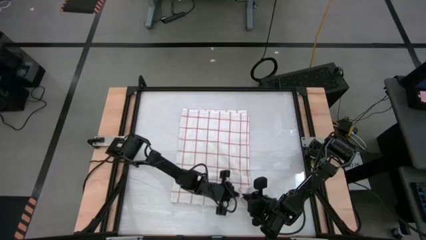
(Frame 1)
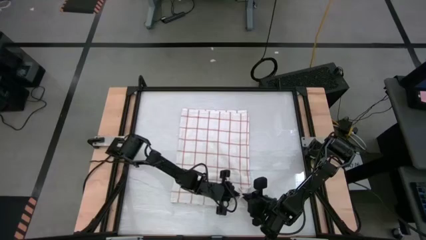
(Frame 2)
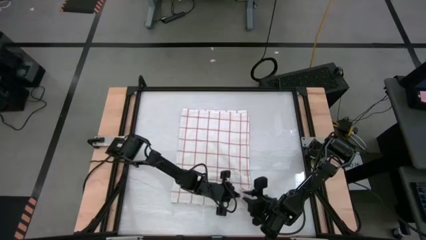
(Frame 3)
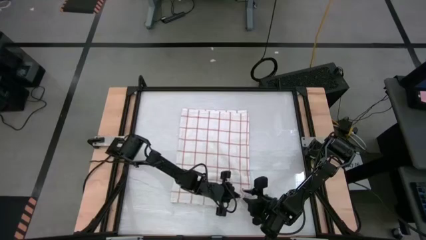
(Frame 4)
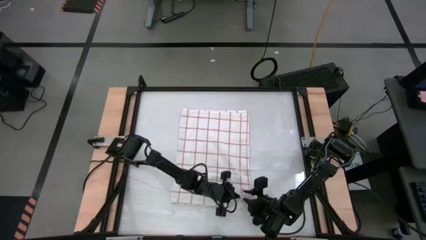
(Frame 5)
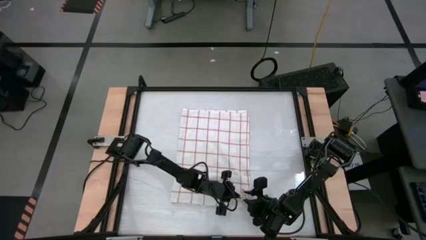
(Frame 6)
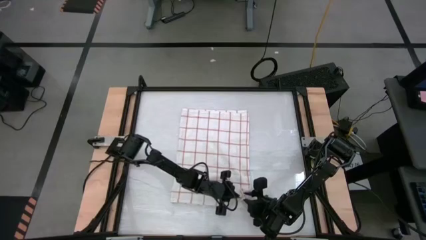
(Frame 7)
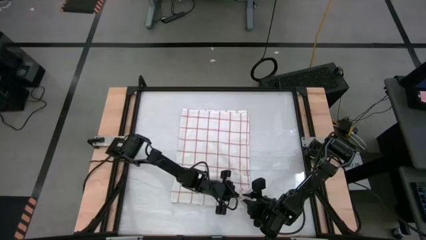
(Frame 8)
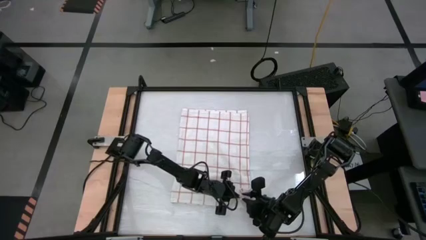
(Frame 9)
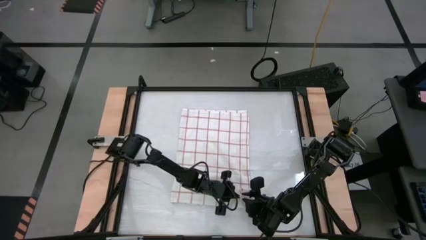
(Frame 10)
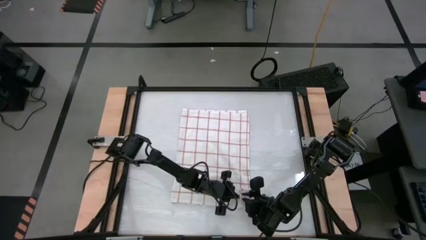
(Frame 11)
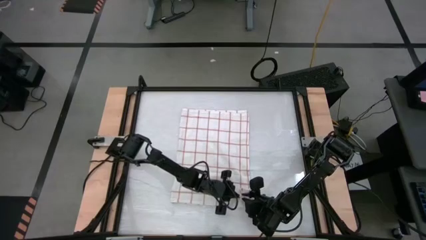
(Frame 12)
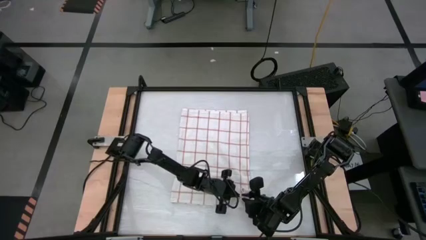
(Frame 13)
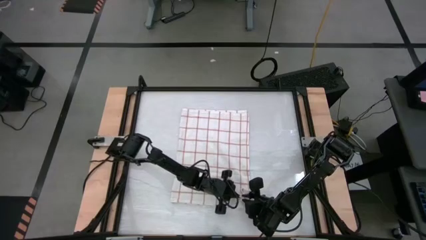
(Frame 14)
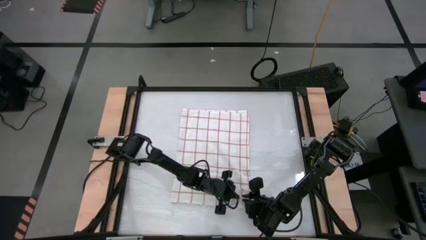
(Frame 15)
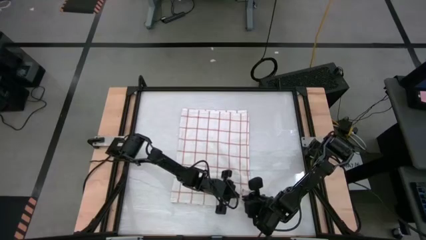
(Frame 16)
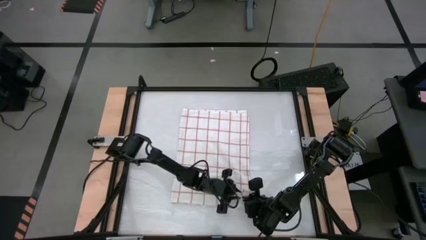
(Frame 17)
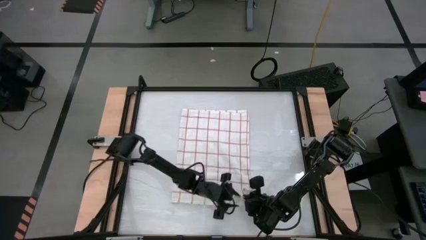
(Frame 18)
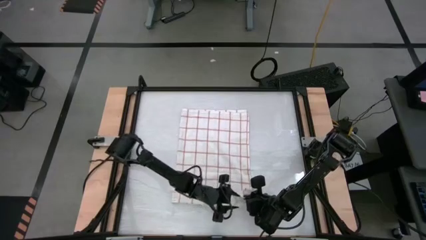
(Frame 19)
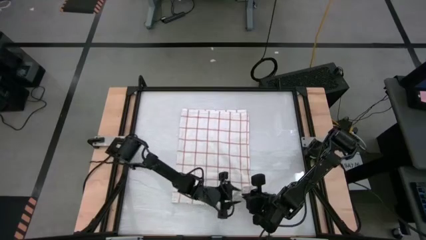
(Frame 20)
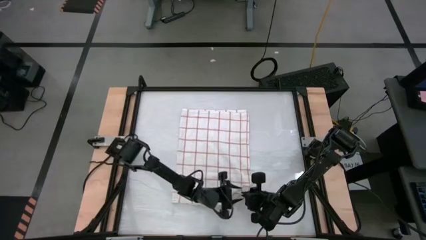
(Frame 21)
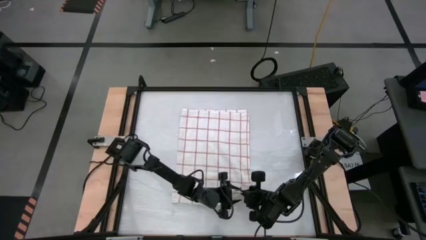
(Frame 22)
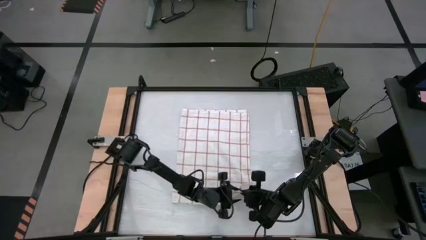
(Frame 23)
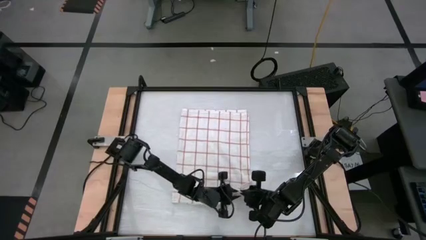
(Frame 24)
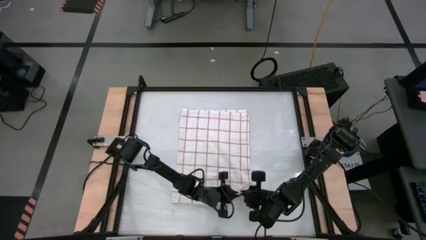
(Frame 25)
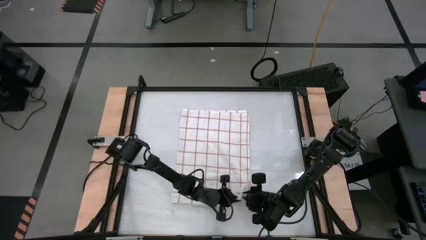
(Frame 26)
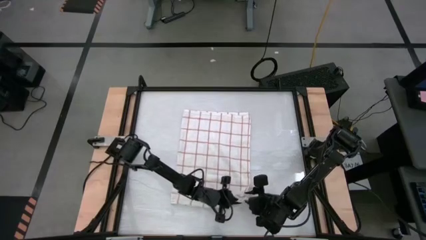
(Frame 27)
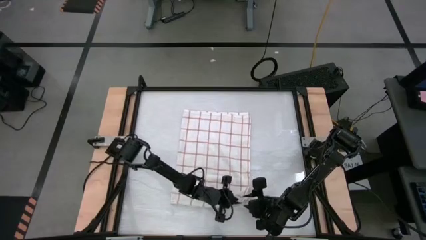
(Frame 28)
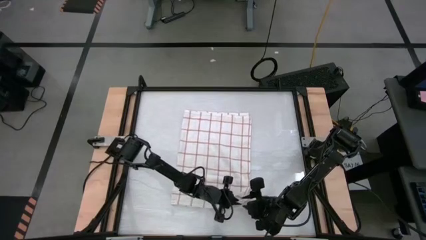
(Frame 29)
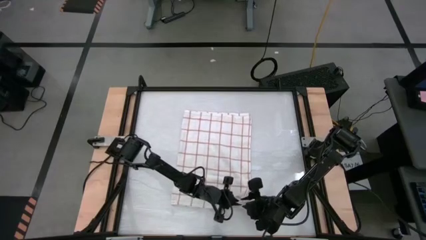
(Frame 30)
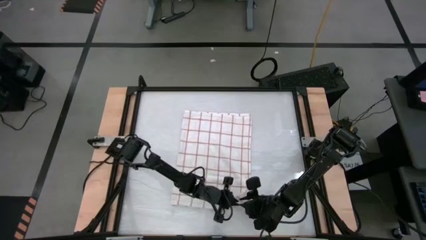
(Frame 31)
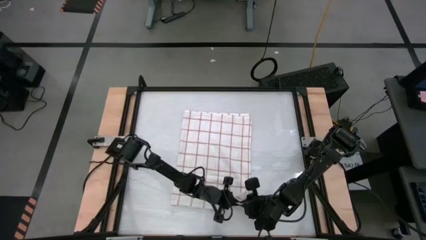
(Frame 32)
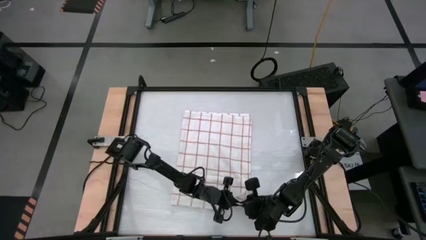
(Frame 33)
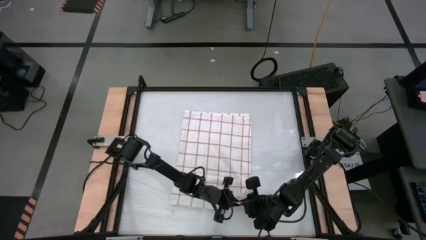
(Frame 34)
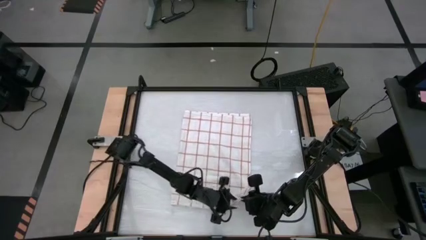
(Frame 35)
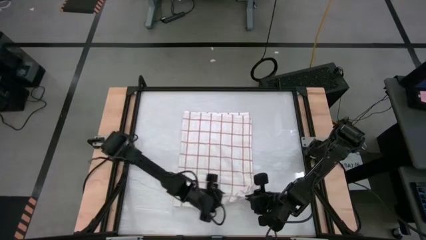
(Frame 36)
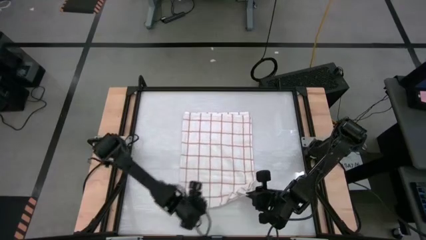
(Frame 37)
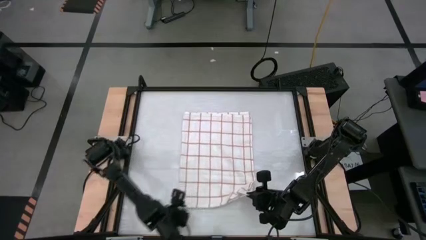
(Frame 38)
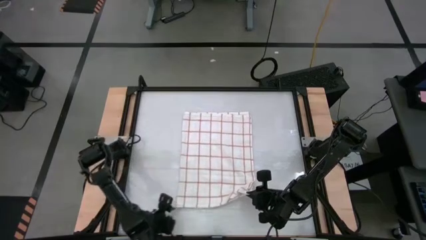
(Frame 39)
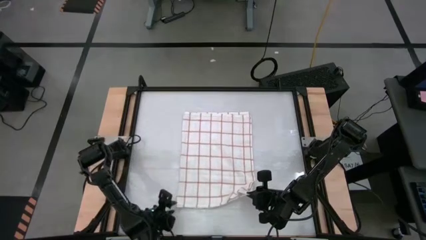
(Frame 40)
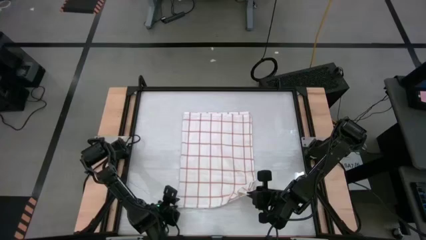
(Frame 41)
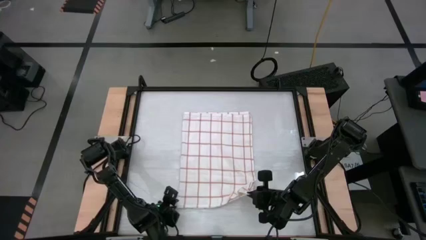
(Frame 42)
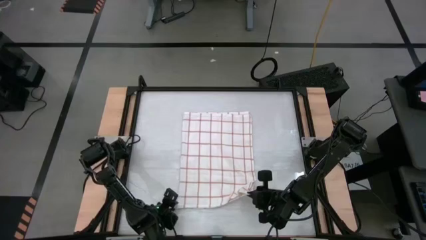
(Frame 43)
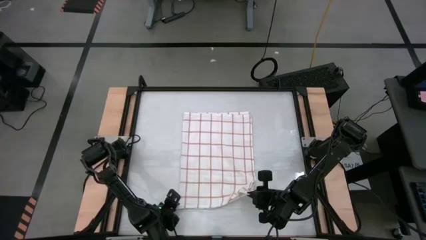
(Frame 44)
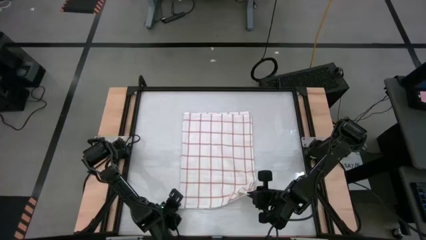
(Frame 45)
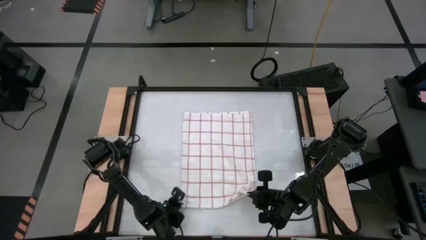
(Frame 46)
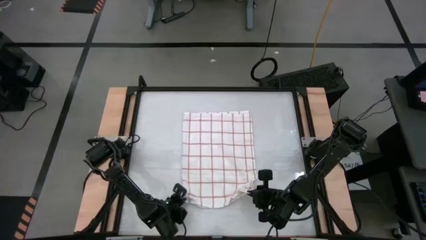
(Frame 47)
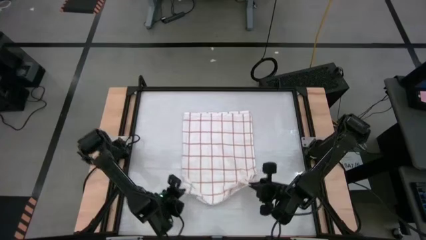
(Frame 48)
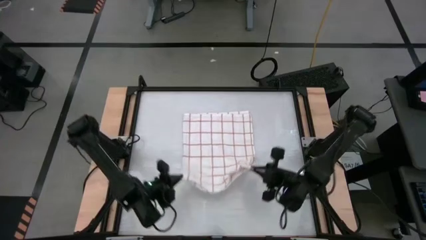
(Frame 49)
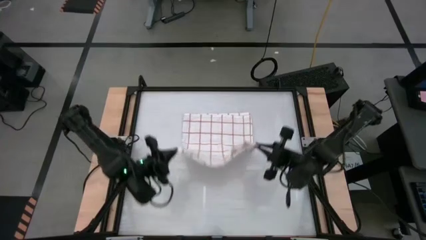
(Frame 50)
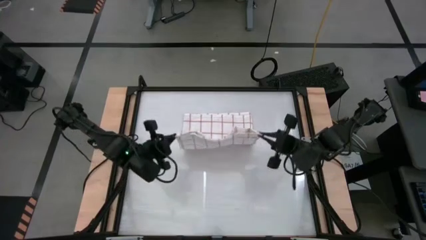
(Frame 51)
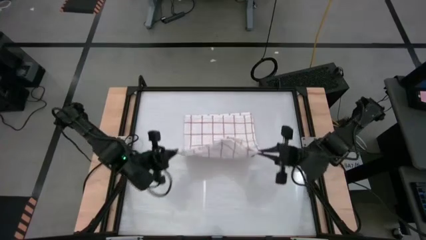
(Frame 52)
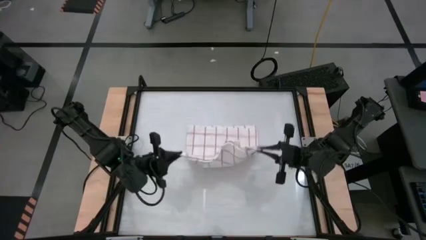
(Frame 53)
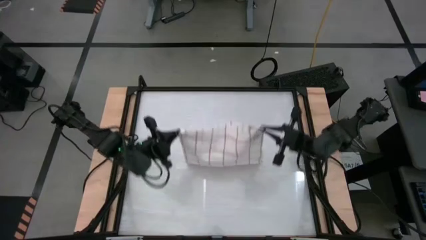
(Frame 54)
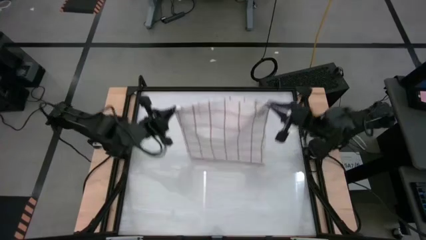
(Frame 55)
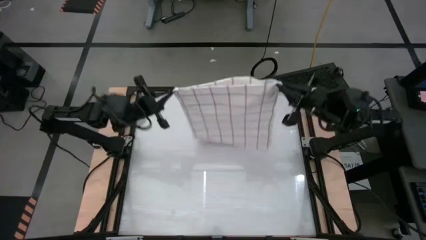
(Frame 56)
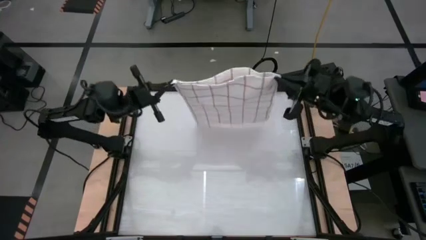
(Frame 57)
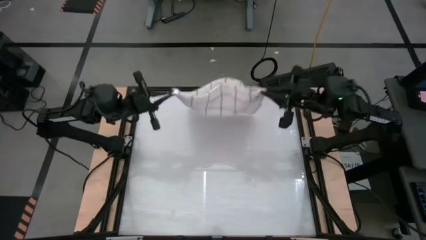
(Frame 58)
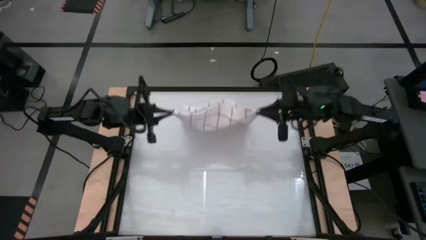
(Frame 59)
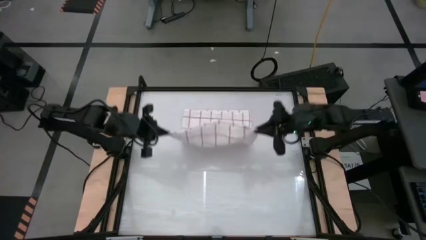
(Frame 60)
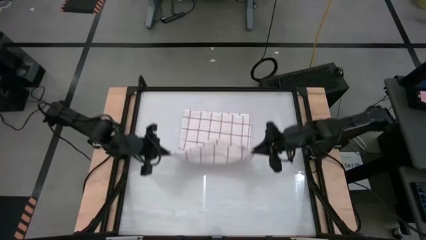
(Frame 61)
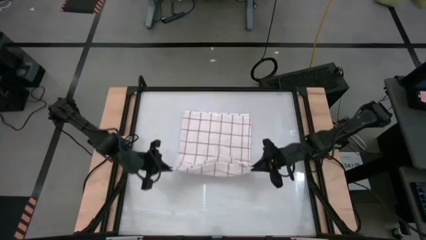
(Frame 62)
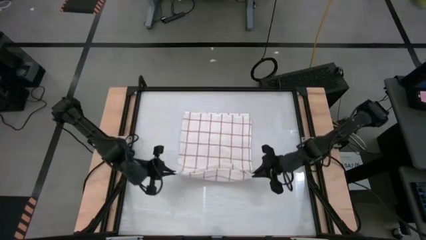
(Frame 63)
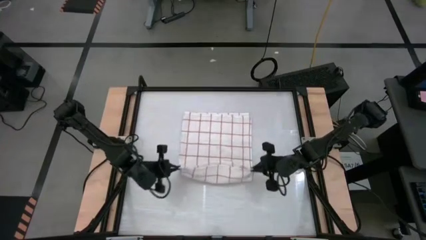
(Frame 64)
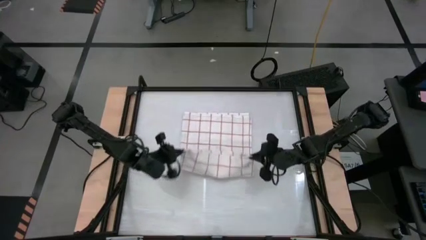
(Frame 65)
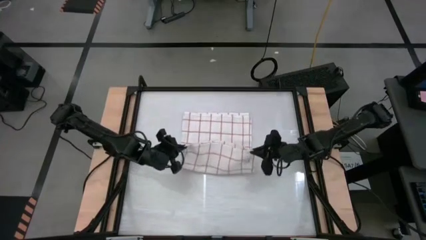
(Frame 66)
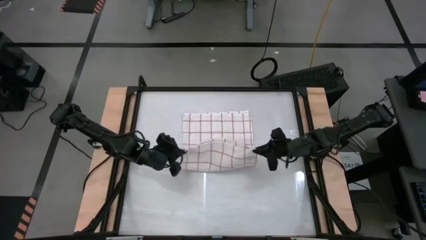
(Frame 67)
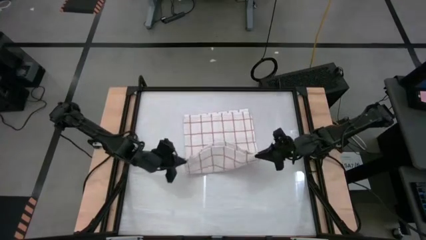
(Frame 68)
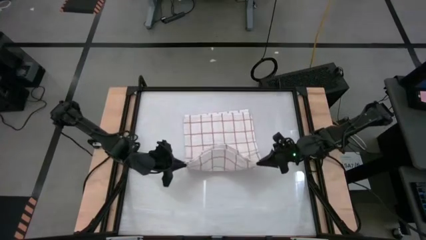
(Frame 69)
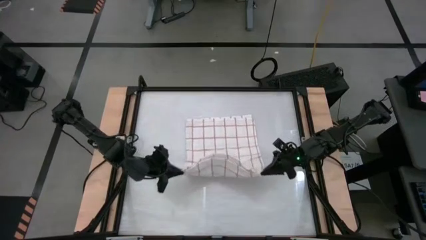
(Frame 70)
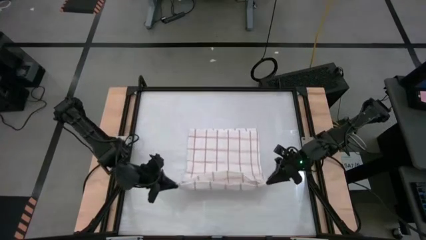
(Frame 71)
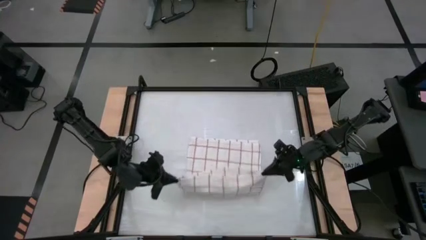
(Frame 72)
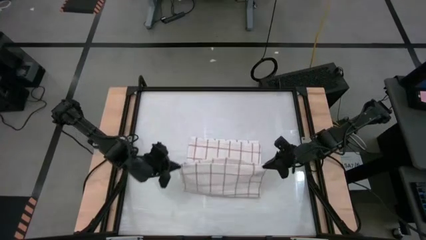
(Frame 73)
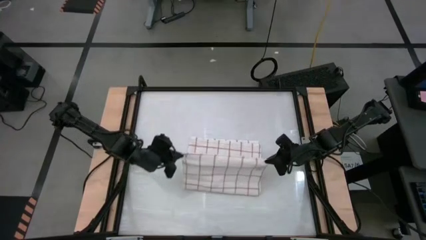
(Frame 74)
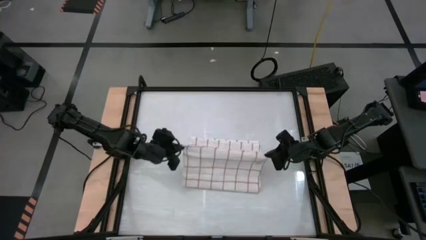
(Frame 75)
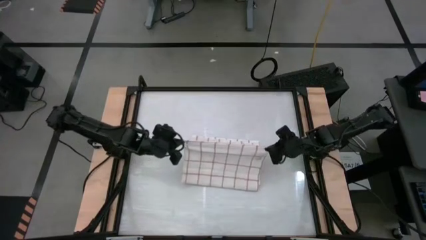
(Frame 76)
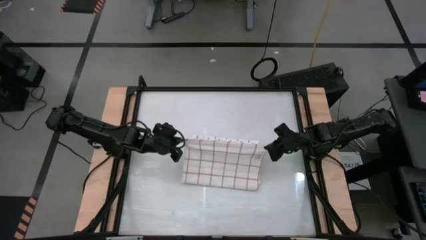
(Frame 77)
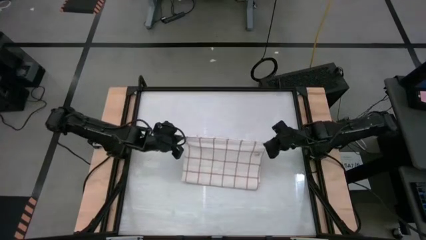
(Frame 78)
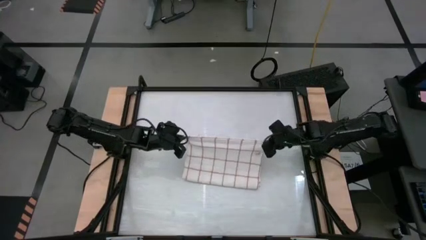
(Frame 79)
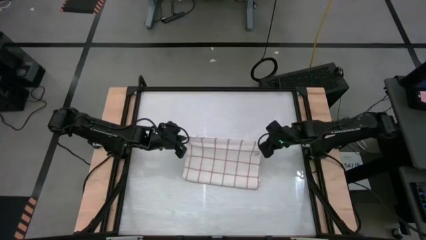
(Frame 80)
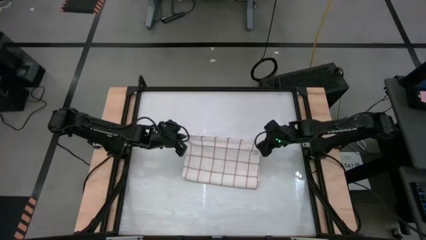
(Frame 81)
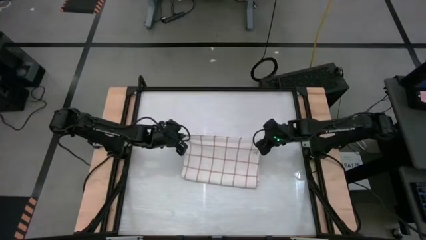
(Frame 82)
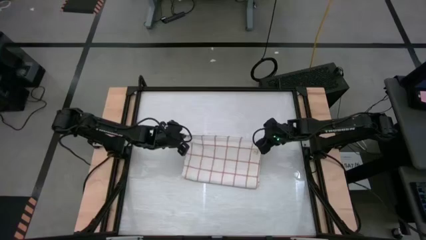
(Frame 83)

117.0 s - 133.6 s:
Task: Roll towel
Fold the white checkered towel
